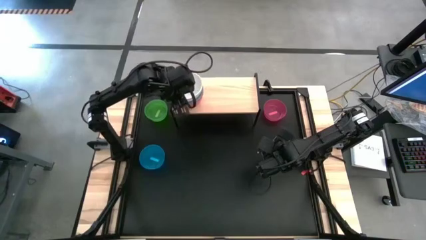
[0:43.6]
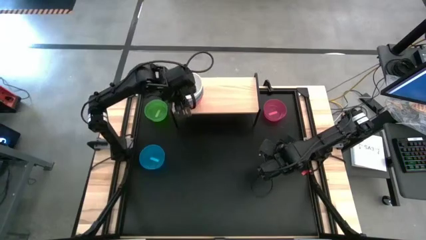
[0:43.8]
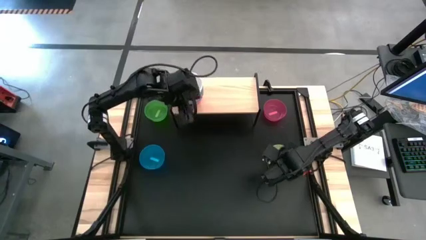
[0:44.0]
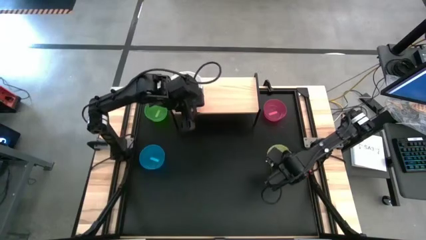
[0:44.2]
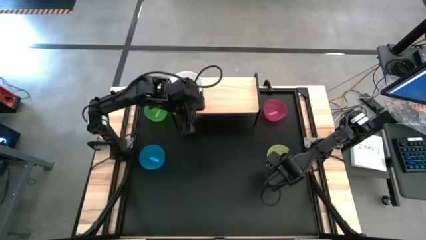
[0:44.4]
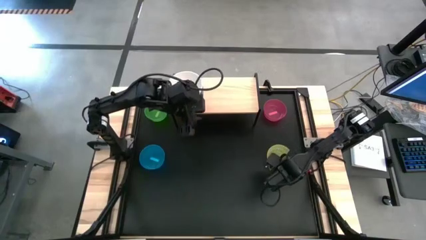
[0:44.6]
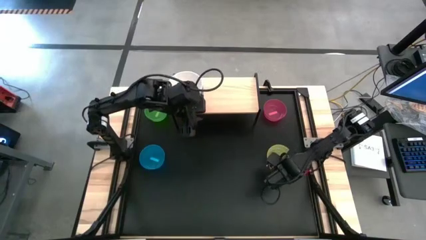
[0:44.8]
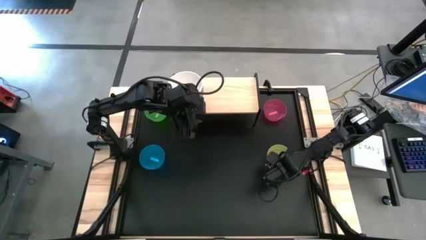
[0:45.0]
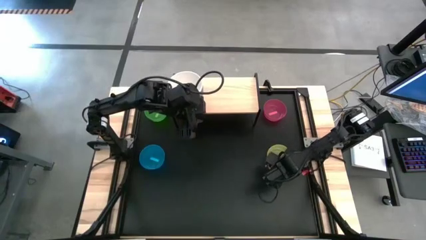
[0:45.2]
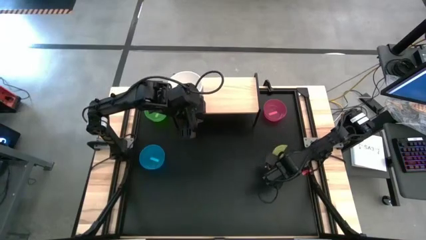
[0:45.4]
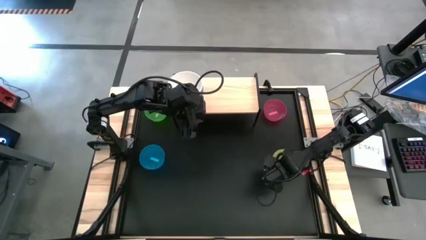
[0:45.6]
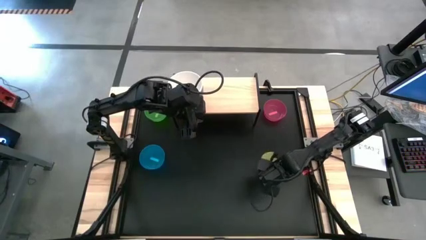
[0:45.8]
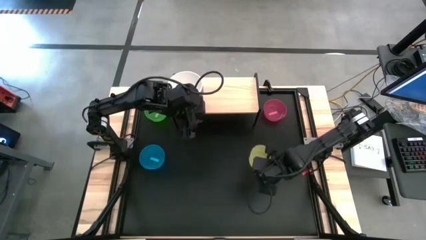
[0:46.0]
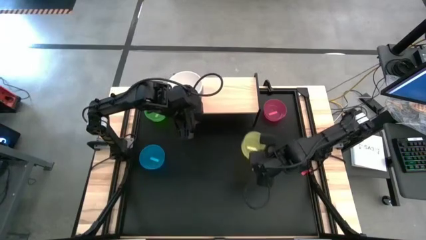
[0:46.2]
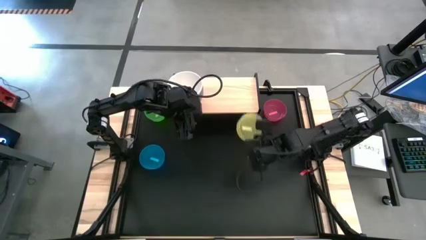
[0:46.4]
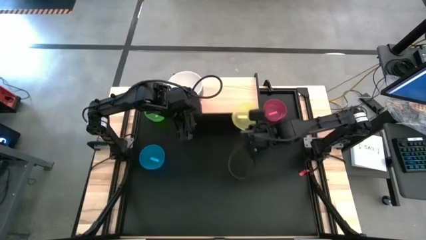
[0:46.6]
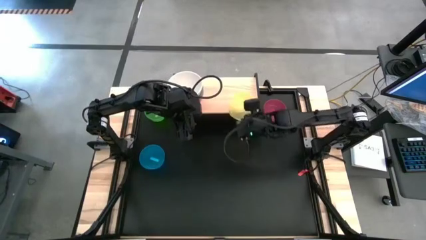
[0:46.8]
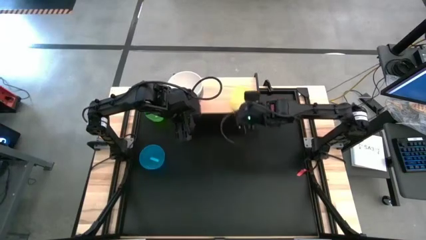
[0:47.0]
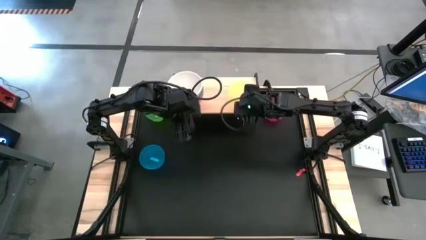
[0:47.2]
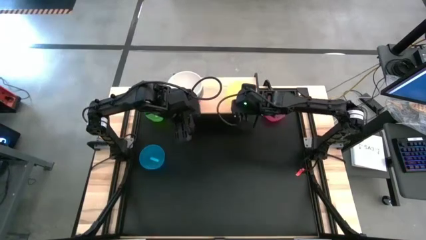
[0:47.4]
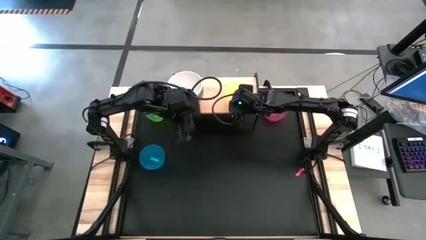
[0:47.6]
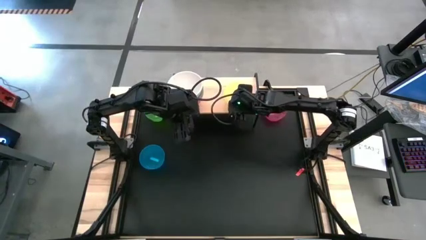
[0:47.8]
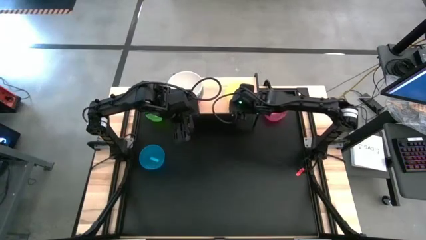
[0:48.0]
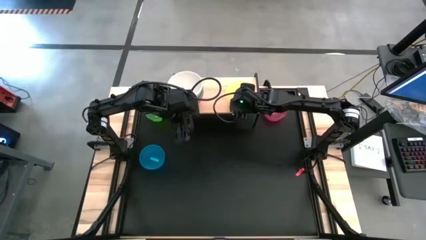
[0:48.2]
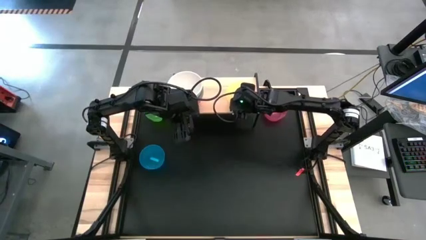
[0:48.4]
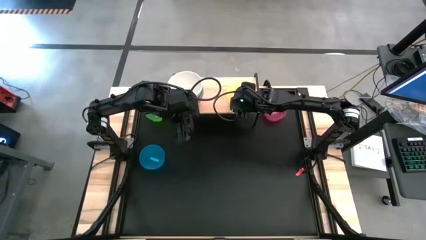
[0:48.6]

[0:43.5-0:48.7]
Task: Place and stack bowls onto a shelf
Put the yellow bowl on the shelf

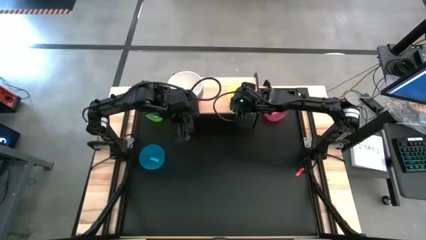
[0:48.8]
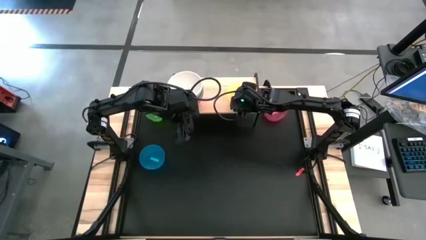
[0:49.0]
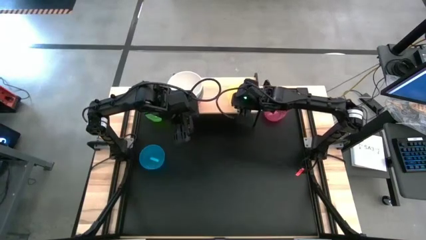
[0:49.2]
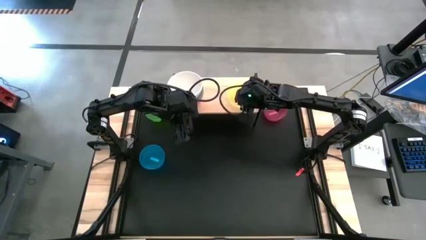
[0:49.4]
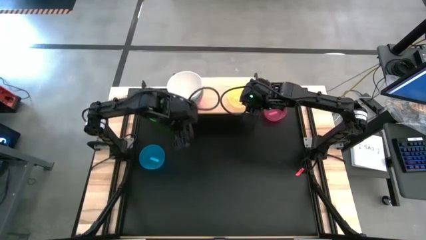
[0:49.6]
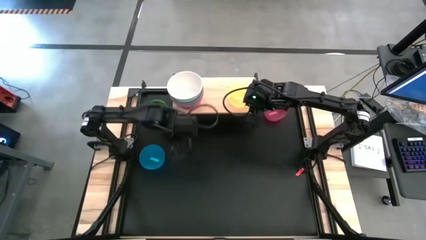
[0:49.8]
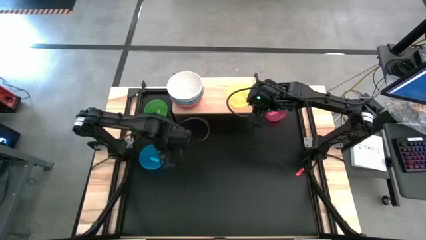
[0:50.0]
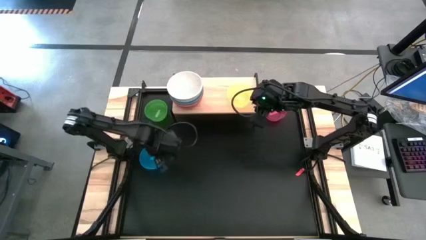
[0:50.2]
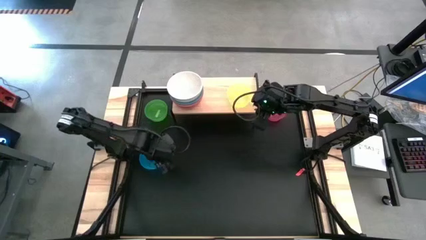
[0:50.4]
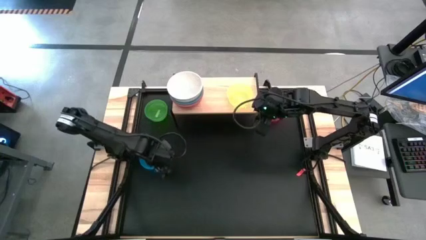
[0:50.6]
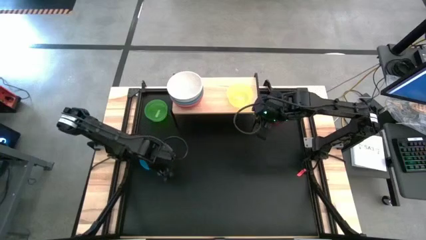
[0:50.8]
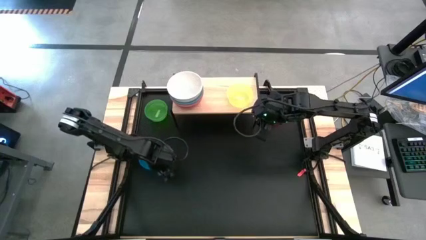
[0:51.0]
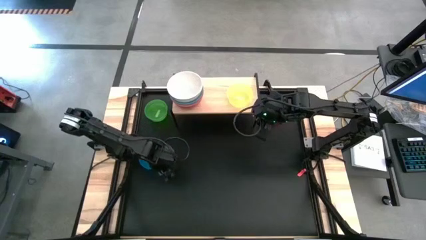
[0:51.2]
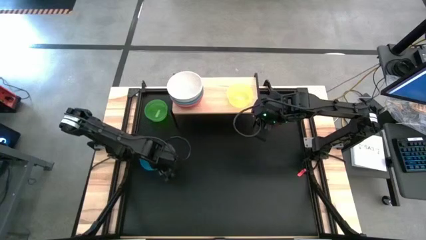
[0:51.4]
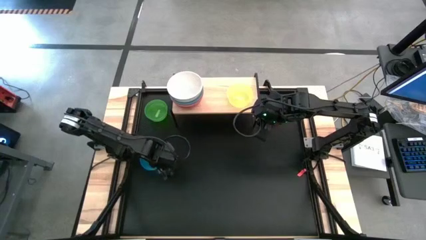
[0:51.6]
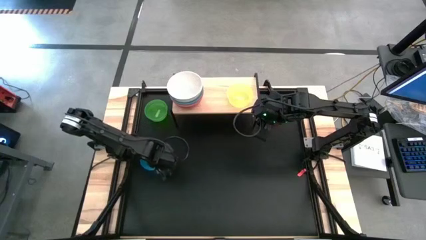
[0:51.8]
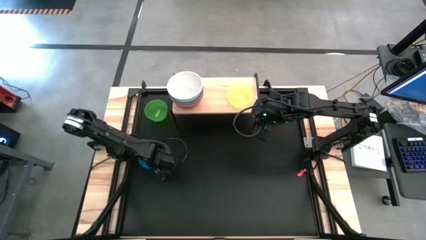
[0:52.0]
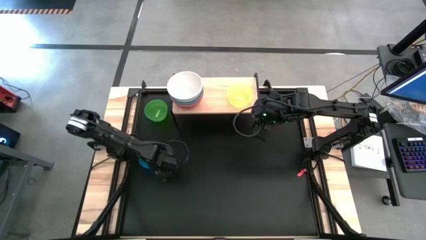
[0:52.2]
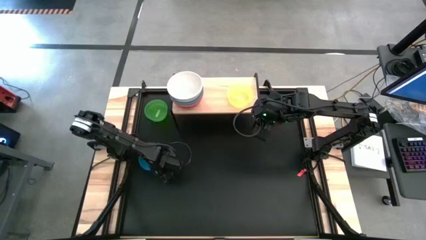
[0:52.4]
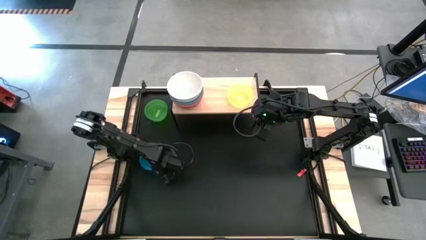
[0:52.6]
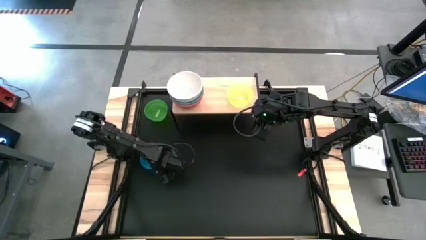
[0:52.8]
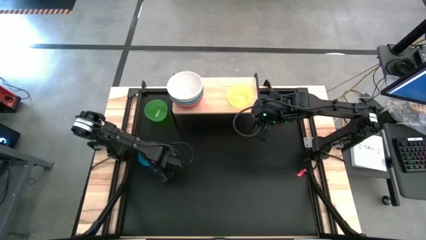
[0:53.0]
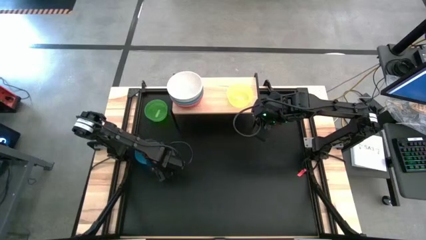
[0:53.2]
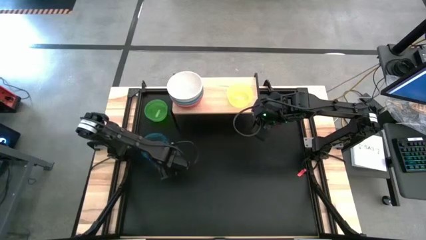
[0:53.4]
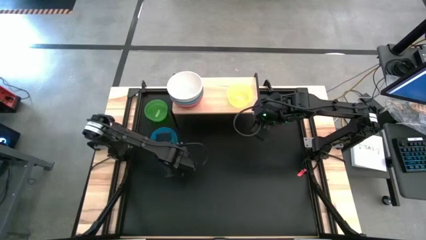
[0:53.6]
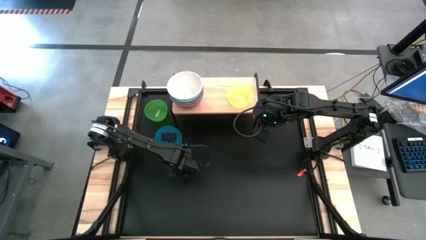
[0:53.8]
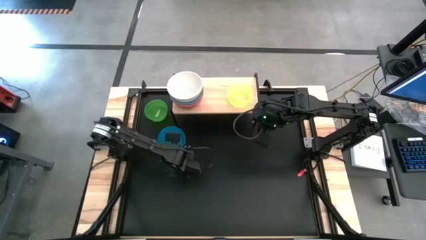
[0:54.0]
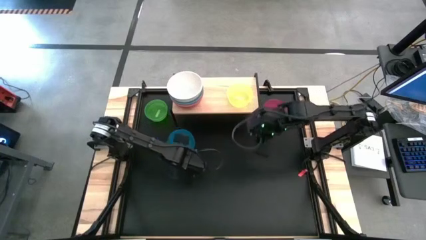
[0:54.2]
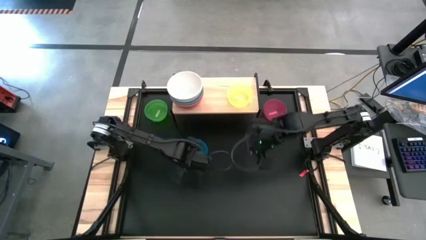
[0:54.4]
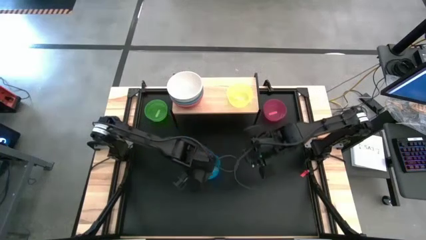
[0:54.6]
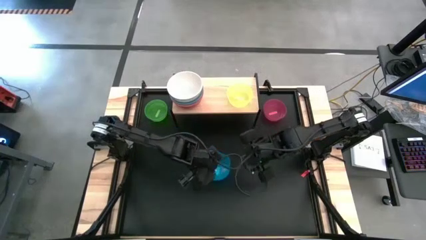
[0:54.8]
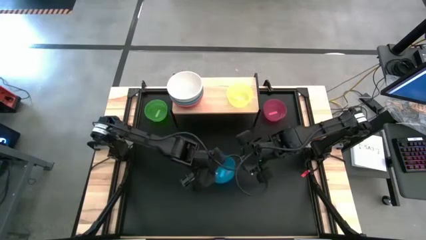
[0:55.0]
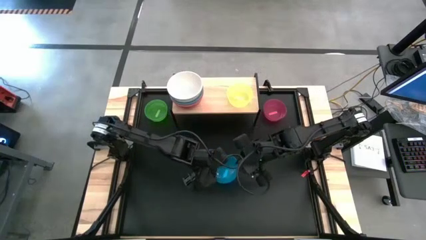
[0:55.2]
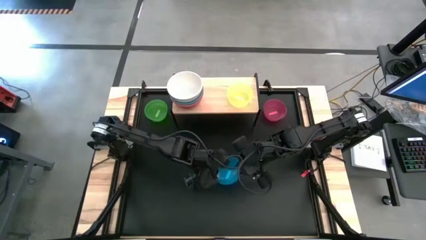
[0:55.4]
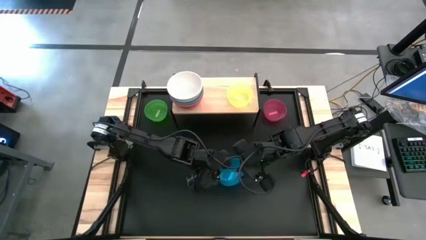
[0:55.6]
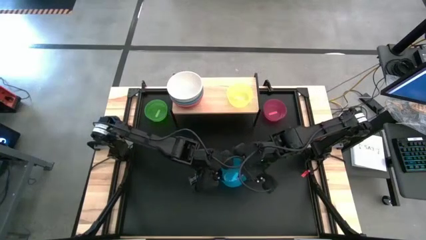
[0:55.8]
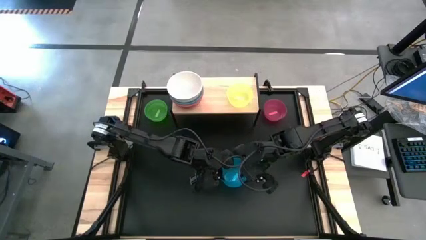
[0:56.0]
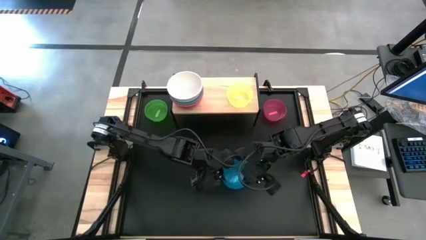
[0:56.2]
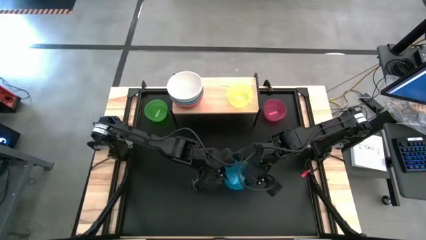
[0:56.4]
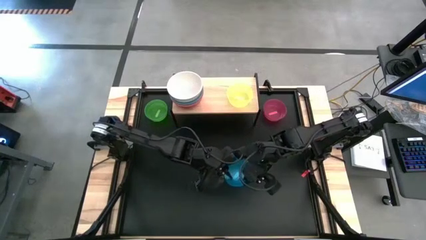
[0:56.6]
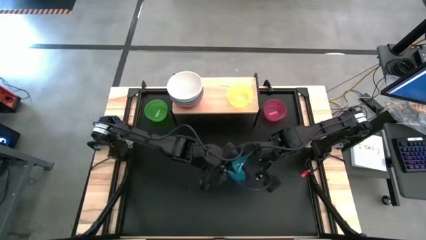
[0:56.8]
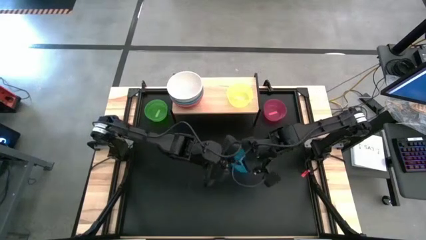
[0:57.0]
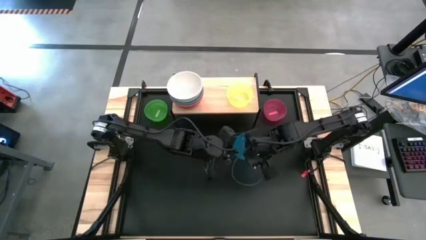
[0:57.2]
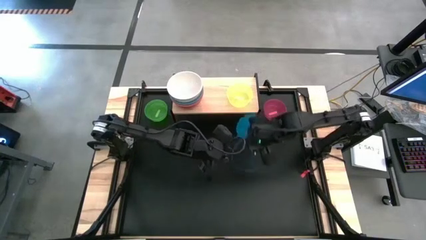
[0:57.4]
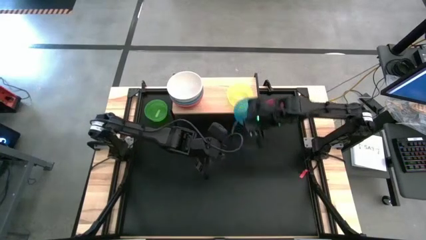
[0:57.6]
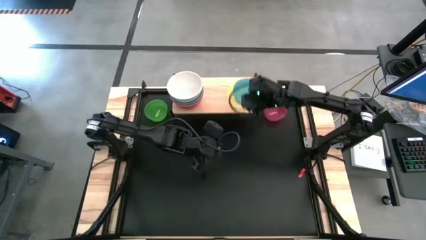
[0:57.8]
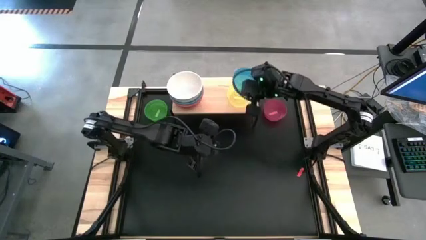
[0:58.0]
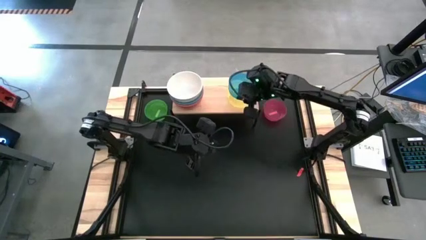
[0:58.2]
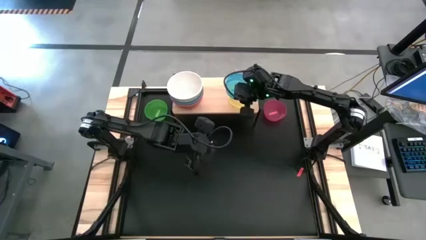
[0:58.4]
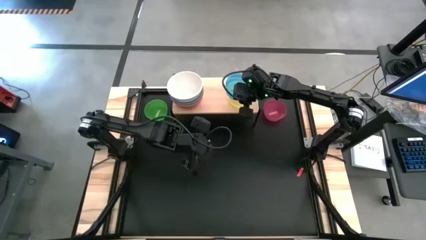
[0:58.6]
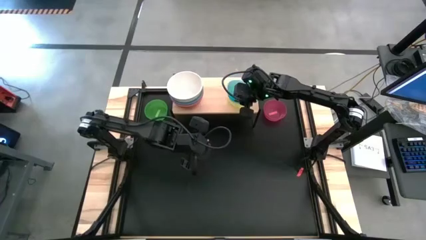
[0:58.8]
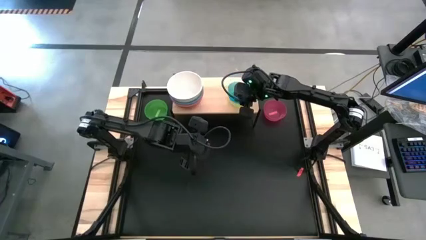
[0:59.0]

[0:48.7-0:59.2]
Stack the small blue bowl on top of the yellow bowl on the shelf

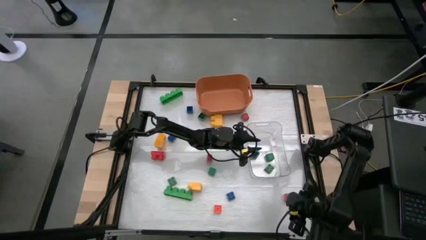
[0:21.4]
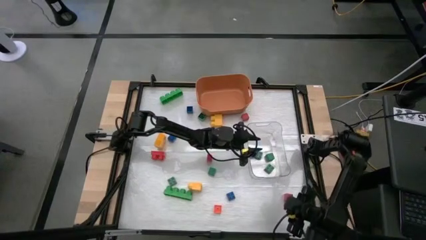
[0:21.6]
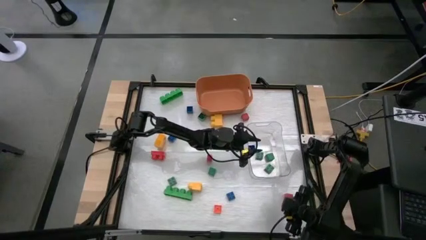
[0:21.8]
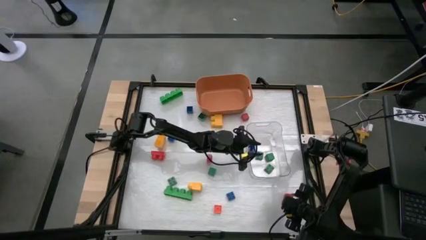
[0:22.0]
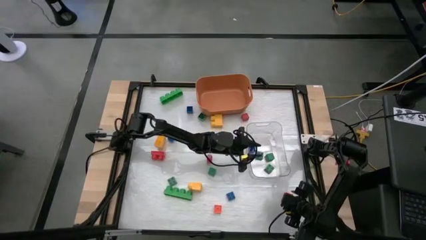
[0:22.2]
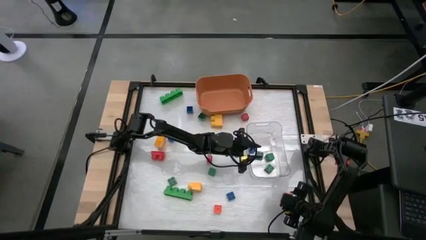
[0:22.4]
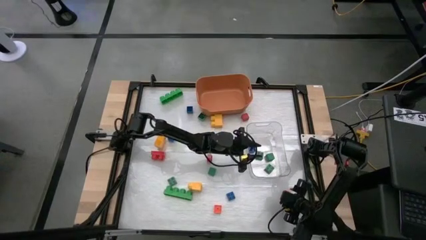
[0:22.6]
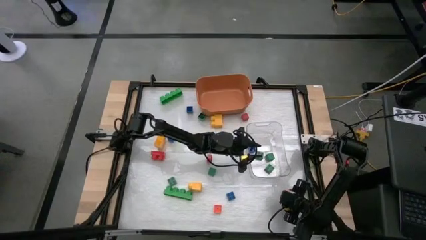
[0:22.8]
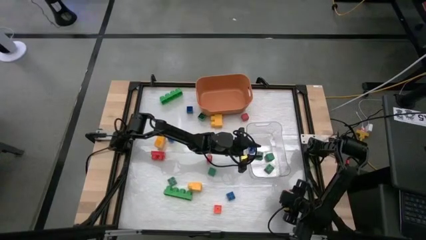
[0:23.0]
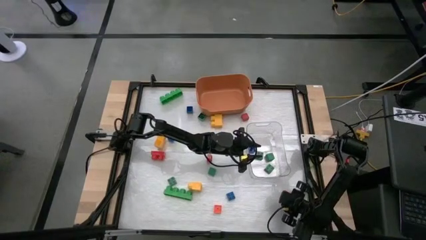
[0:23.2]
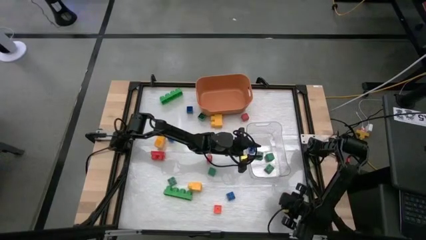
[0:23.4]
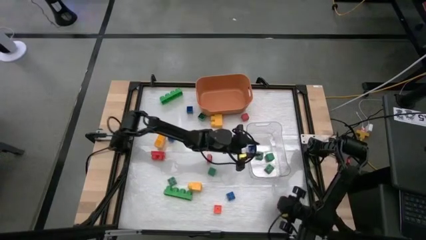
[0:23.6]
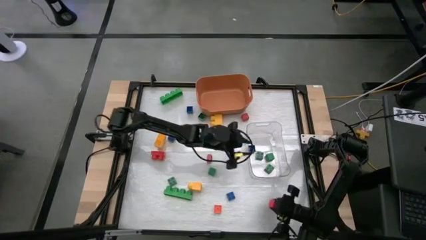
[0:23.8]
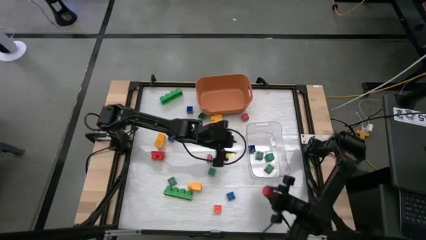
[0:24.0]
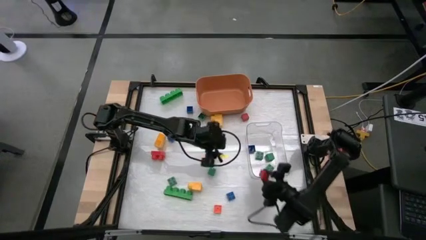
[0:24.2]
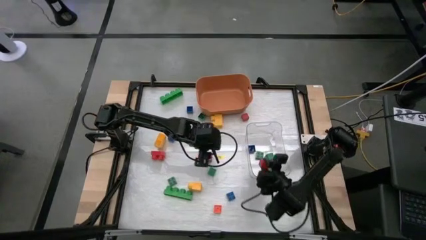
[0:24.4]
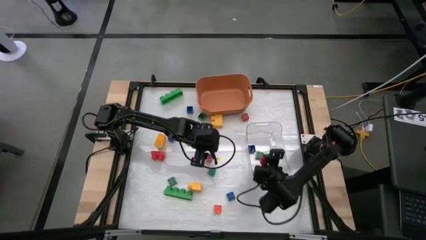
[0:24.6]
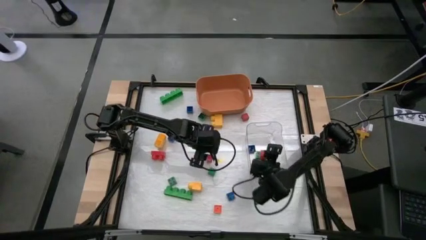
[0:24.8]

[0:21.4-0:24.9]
Task: Sort blocks by size
Put the small red block into the transparent bin
